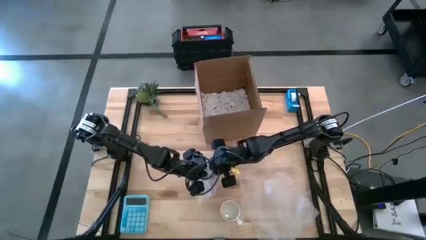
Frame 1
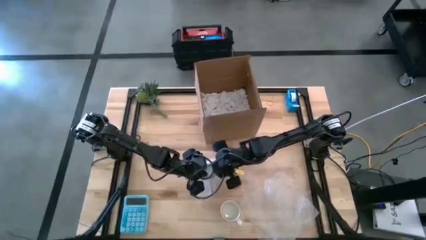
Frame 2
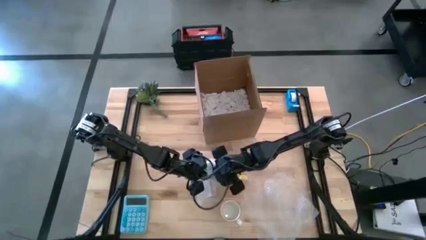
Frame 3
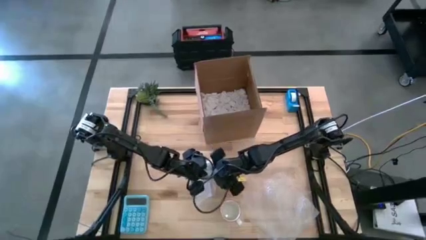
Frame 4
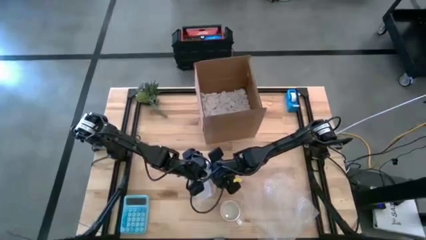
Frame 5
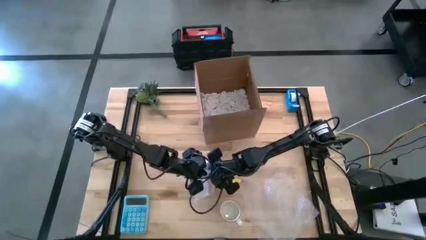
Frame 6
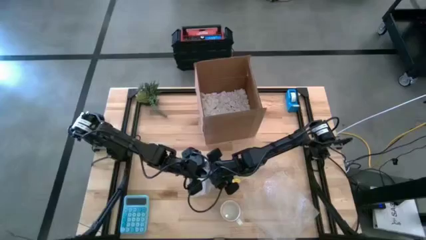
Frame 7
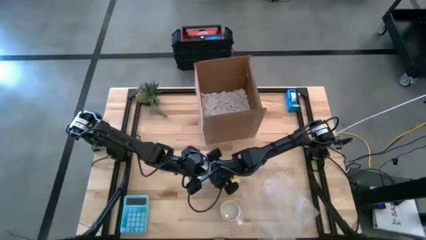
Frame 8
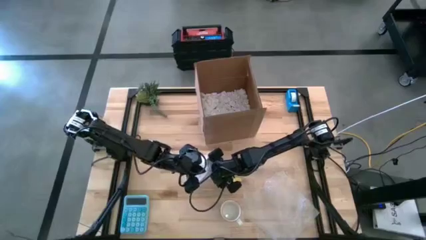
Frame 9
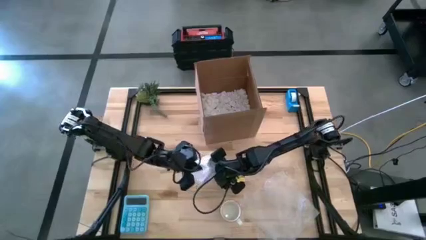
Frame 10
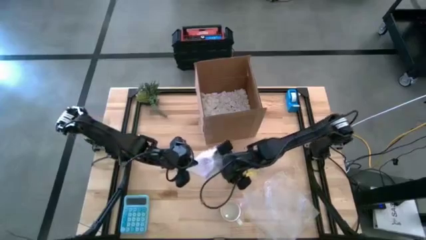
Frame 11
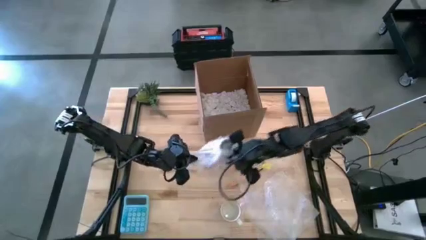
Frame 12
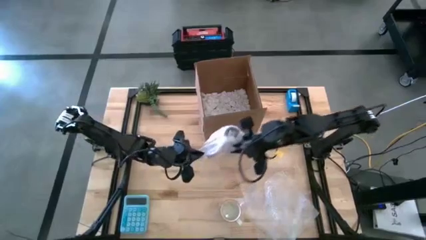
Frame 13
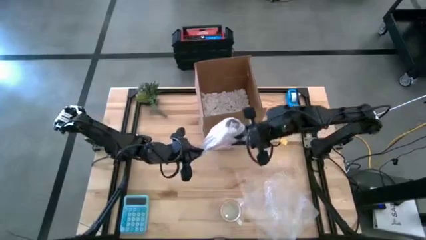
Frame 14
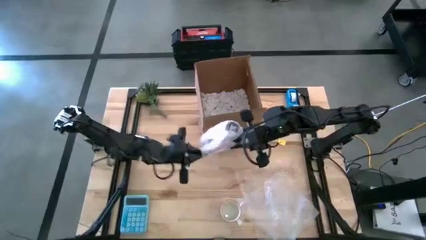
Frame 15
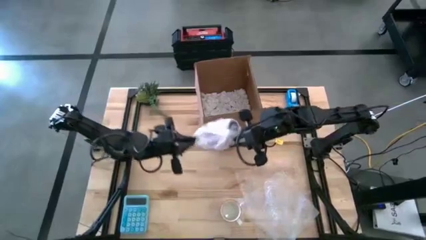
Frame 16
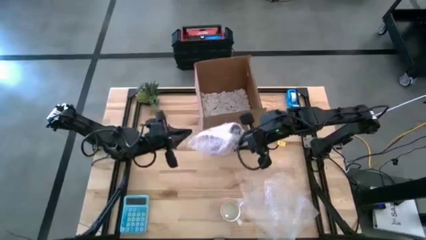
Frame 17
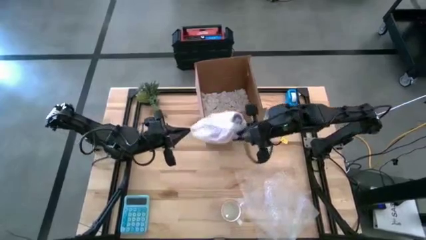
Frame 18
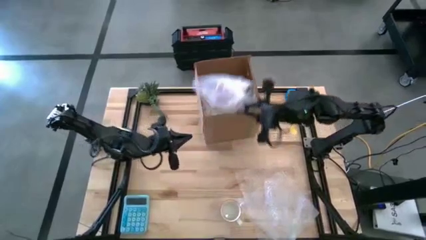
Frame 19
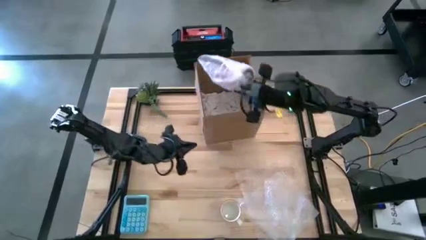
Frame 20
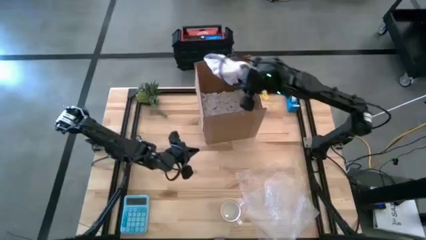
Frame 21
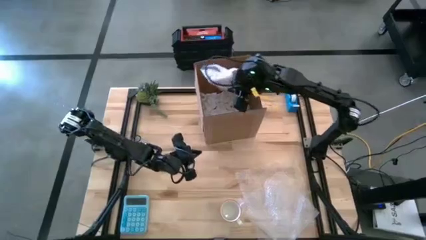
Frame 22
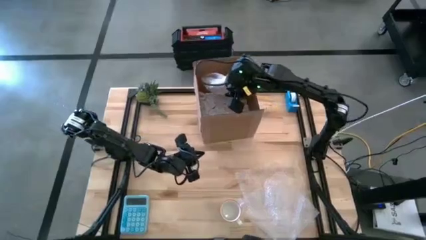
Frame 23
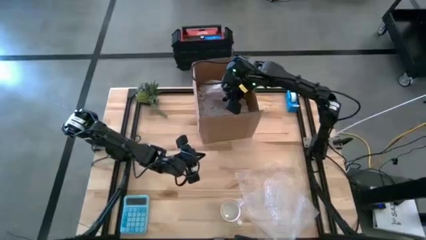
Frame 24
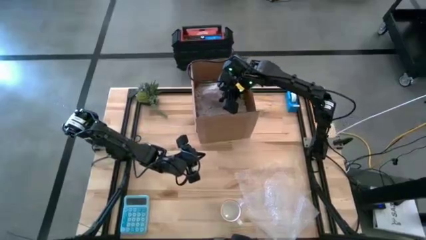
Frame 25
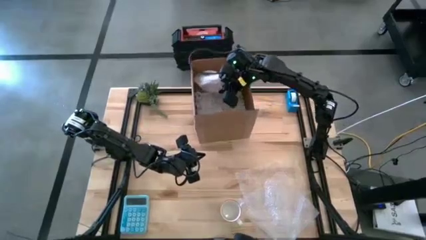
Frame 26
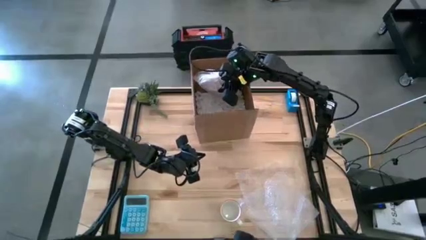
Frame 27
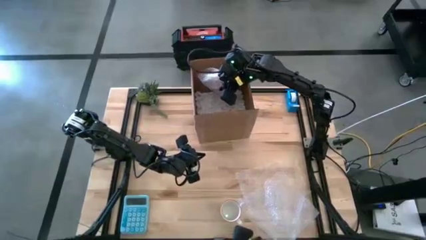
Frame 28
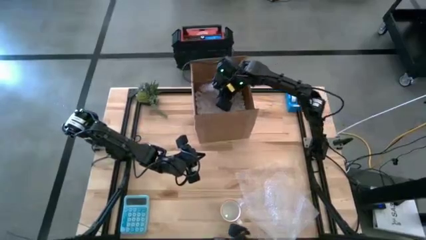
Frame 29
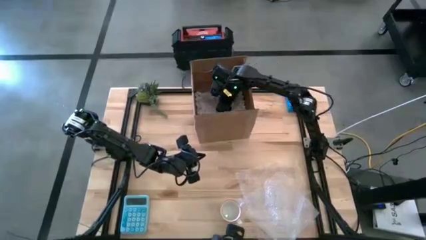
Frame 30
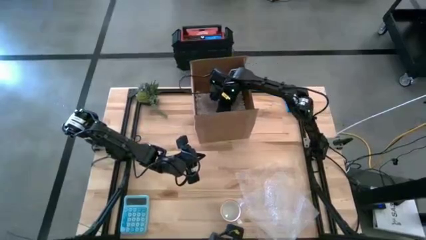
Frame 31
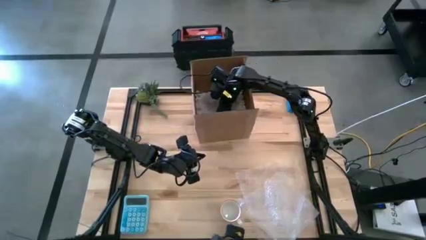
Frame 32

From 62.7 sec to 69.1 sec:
Task: wrap mug
Put the wrapped purple mug into the cardboard box

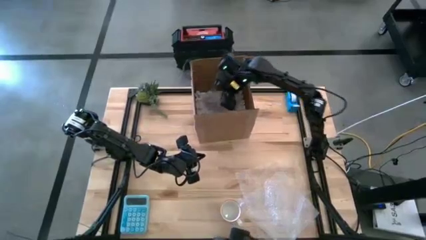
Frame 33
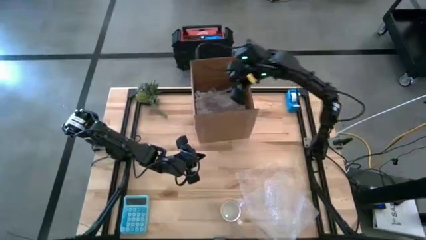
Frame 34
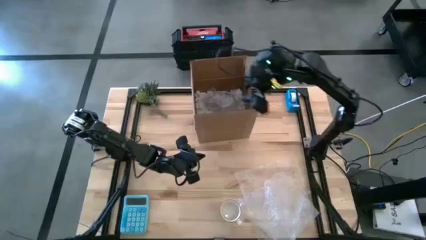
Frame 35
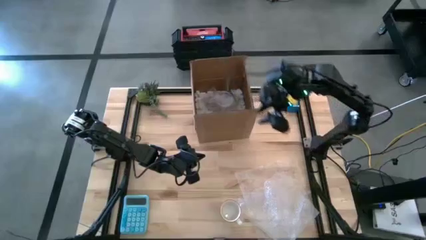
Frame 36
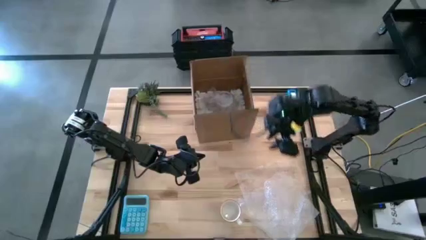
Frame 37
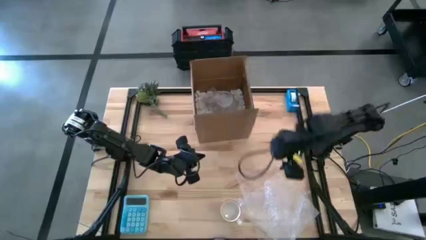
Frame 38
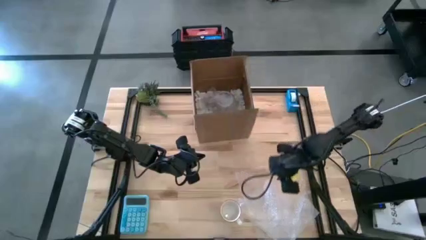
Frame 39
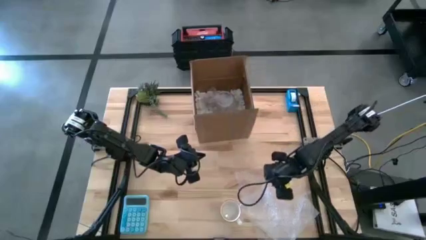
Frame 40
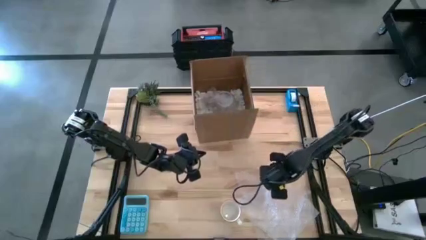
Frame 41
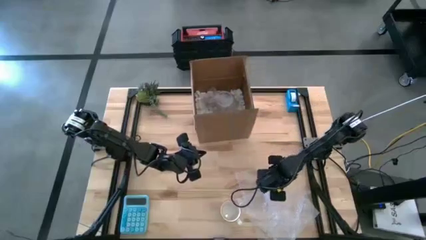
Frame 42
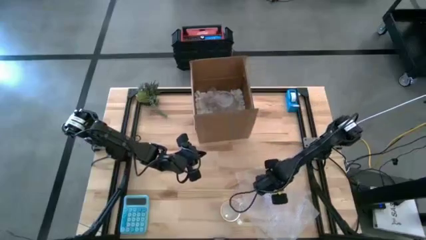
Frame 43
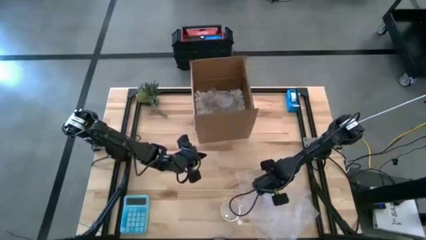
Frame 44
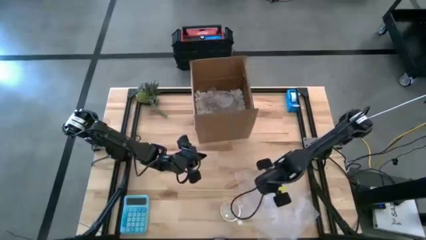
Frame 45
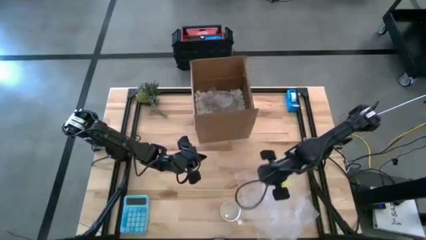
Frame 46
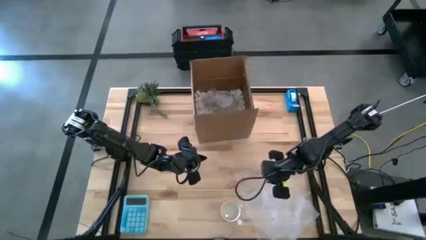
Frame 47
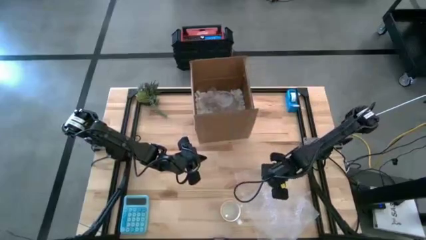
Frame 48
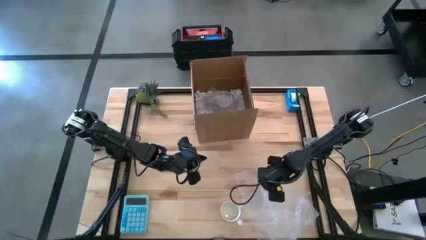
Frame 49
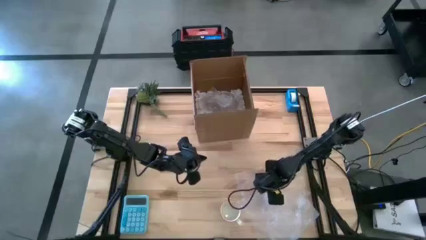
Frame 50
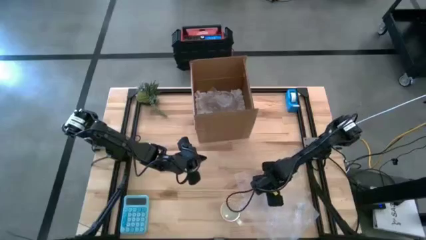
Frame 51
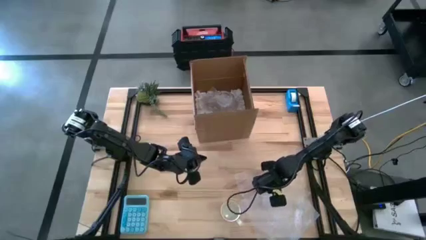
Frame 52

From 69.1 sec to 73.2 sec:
Wrap the gray mug with the bubble wrap

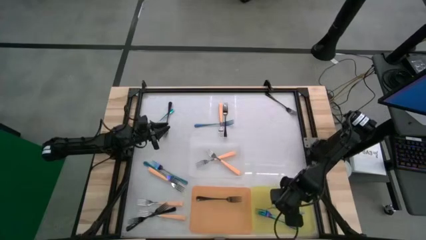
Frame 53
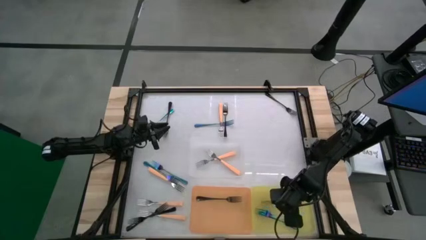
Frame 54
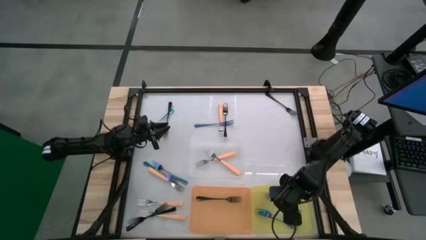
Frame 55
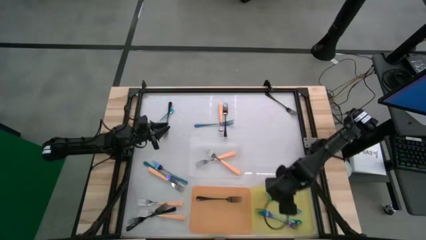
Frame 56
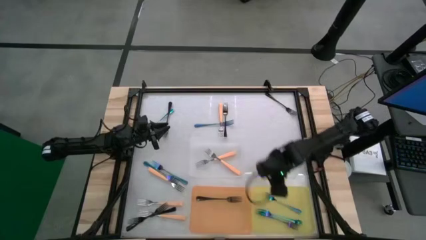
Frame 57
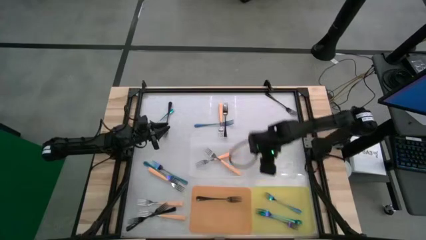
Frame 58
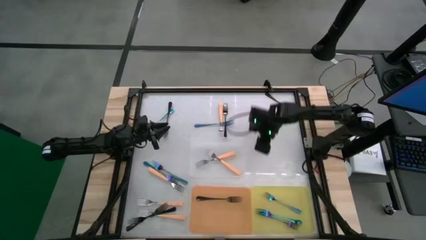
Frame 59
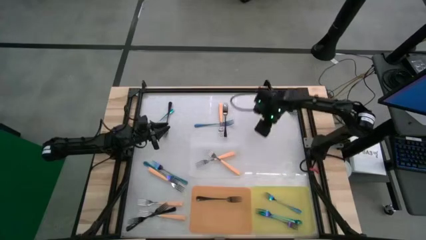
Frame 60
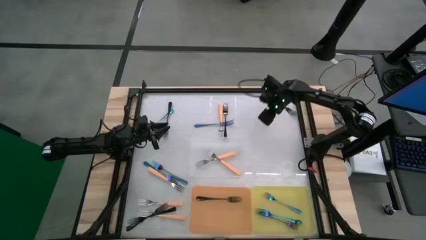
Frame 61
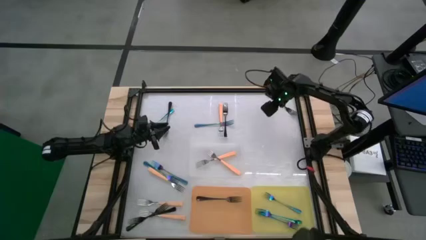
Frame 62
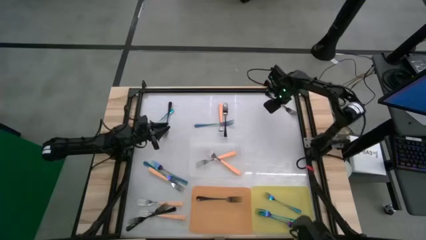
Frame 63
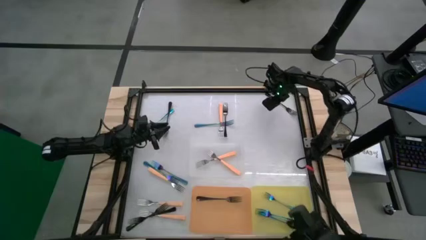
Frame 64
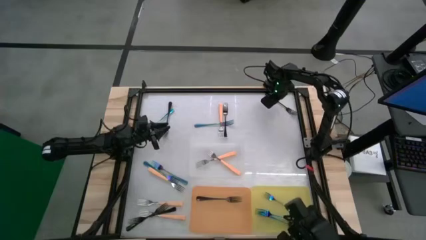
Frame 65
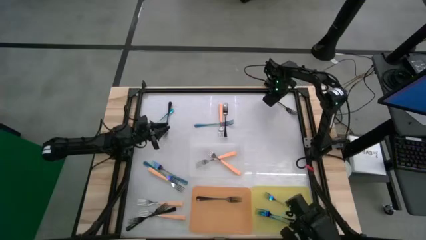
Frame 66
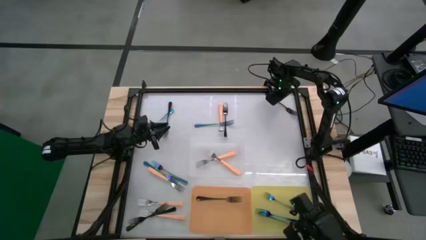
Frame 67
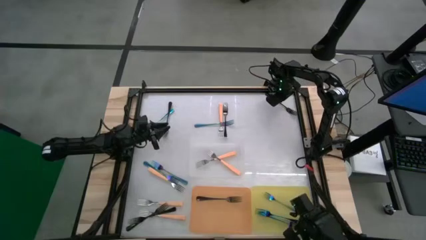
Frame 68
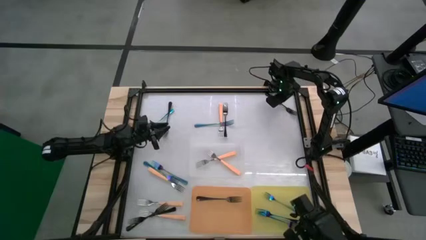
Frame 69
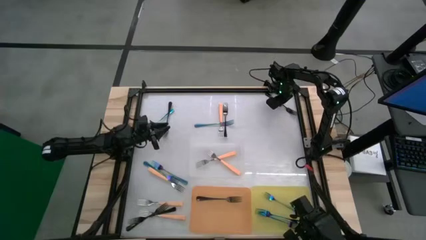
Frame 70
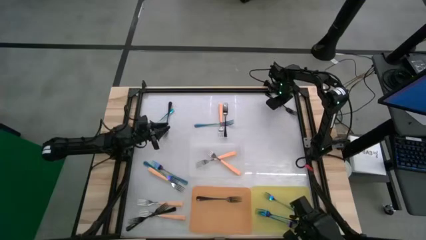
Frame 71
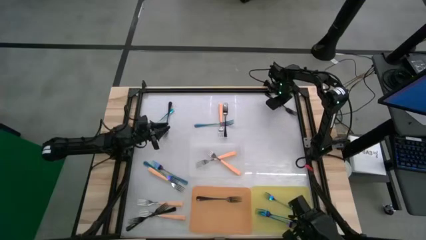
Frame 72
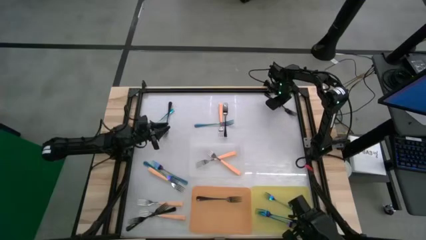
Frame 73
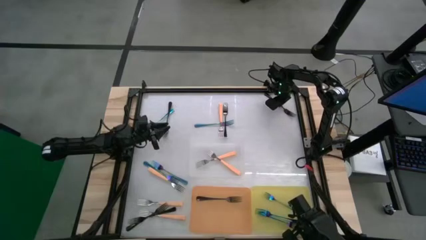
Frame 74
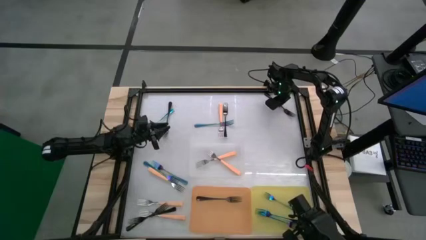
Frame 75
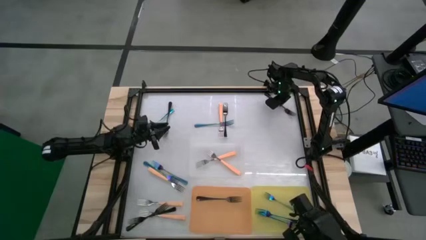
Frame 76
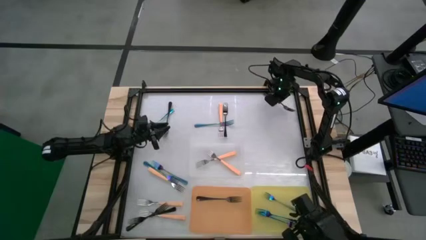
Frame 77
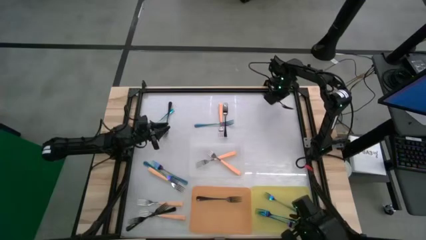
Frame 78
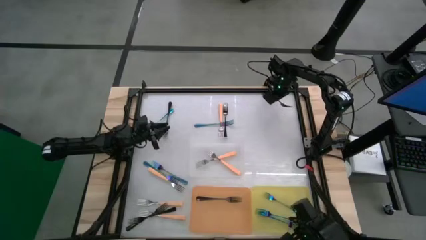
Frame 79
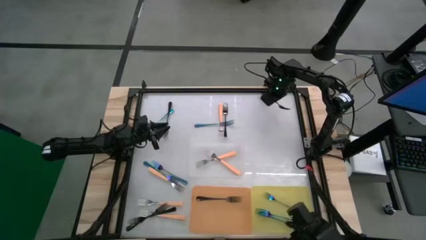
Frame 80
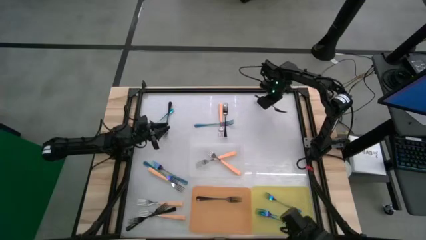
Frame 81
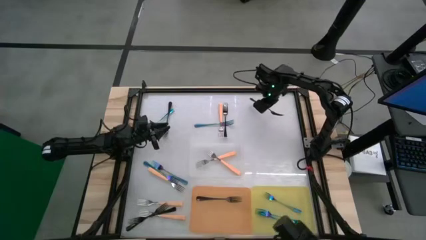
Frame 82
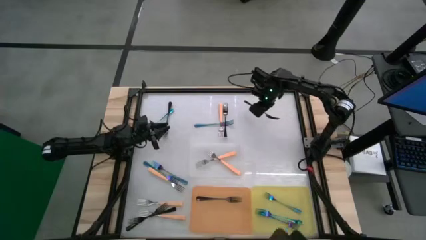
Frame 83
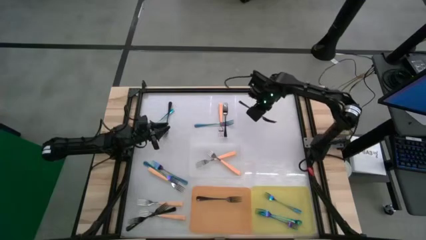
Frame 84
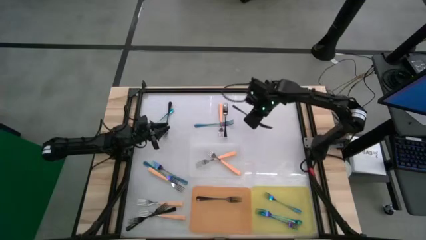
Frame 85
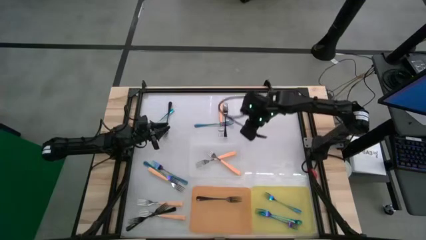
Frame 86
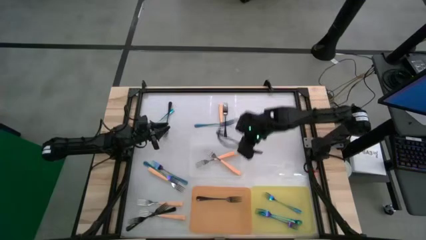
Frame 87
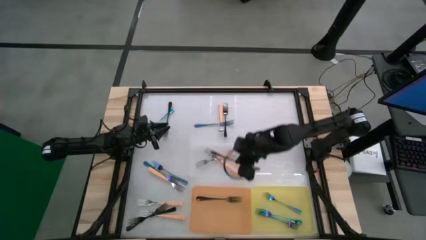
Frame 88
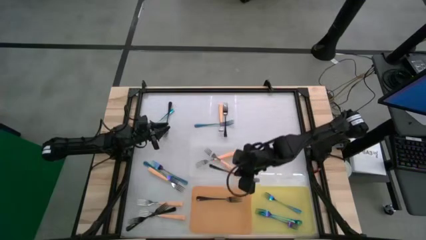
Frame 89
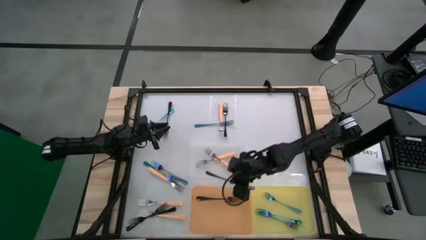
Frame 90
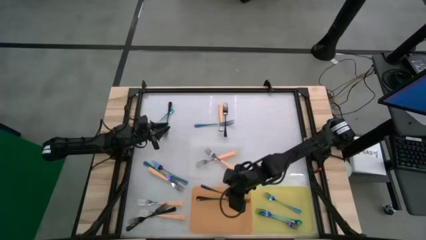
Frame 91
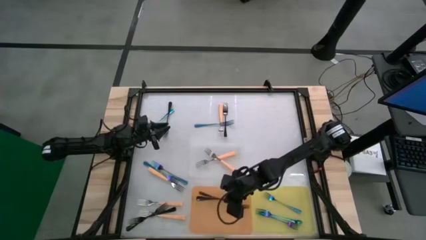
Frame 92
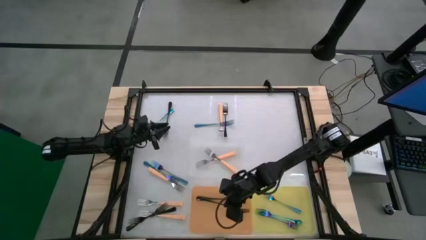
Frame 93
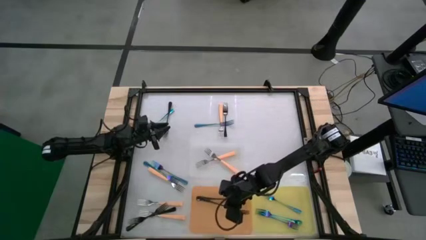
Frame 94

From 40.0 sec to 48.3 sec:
Task: Sort silverware by color (type)
Put the black fork into the orange bin
